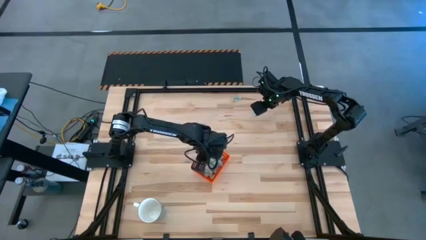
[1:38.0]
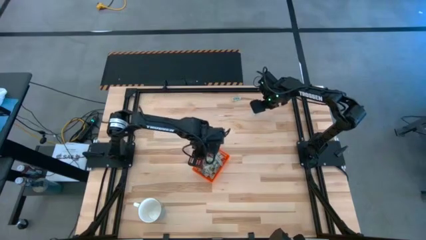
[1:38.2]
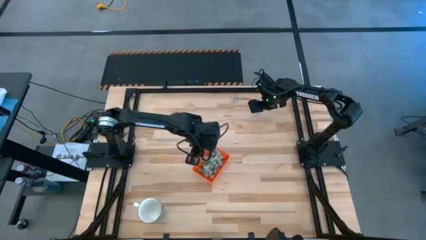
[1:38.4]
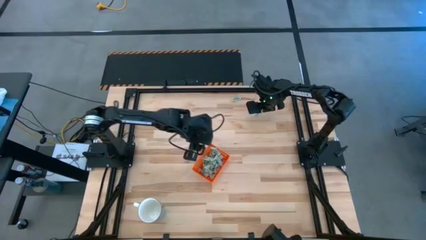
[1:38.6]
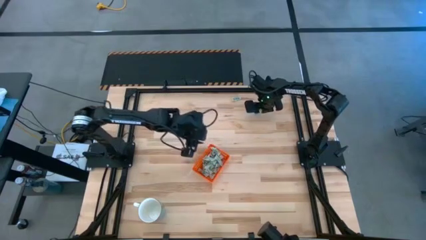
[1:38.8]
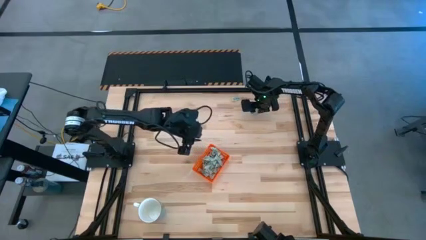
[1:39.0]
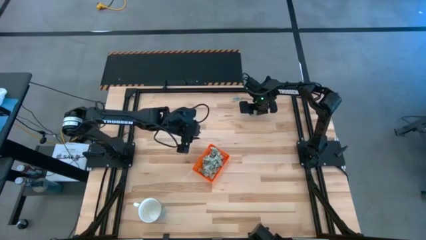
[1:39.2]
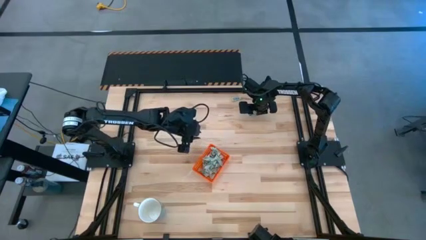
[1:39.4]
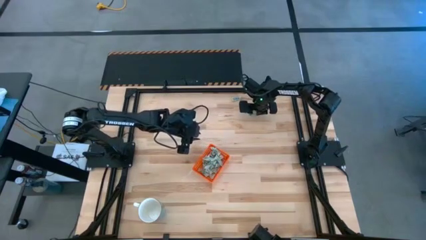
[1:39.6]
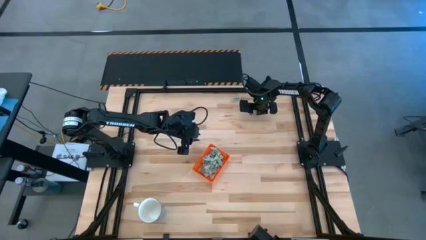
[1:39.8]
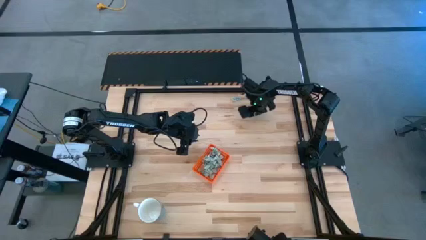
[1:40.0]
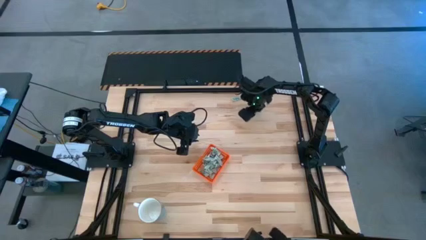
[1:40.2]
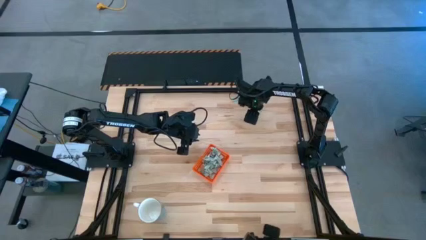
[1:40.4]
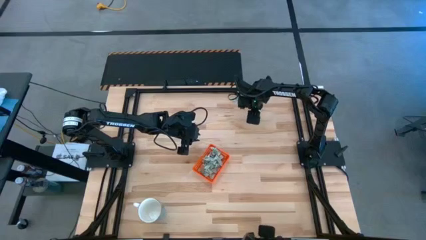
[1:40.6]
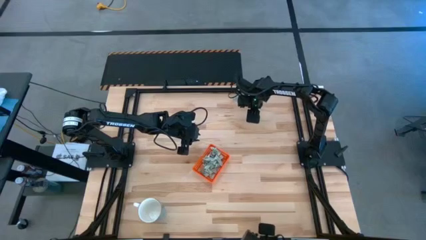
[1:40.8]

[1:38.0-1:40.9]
Task: Pick and place Stevia / Truvia into bins
Put the stevia packet into the orange bin

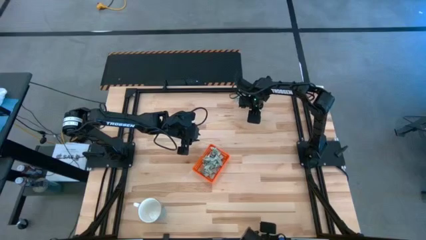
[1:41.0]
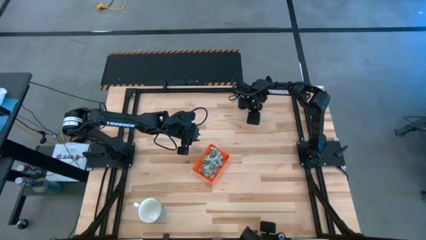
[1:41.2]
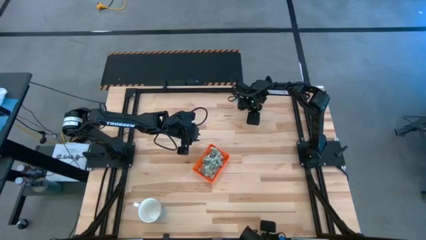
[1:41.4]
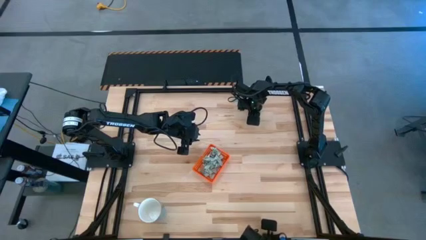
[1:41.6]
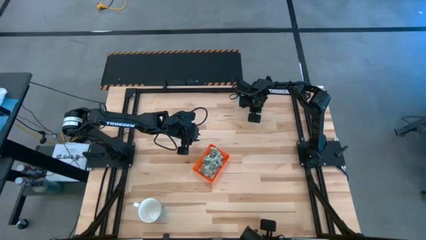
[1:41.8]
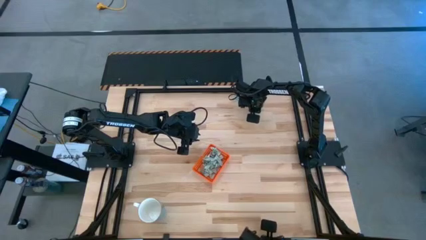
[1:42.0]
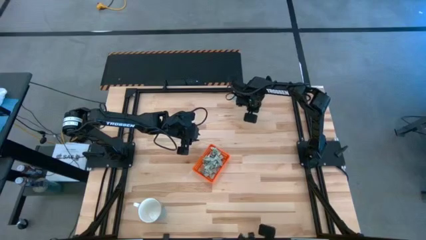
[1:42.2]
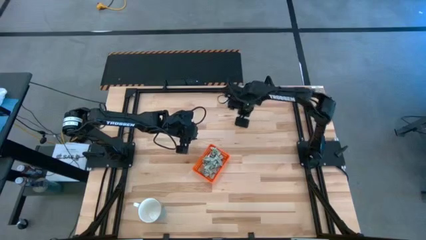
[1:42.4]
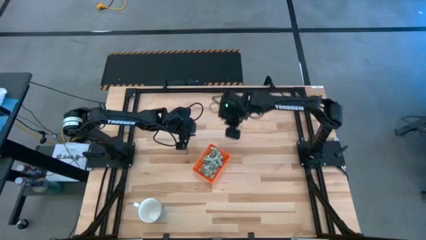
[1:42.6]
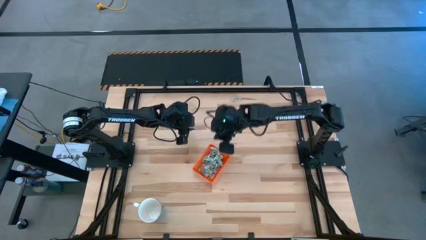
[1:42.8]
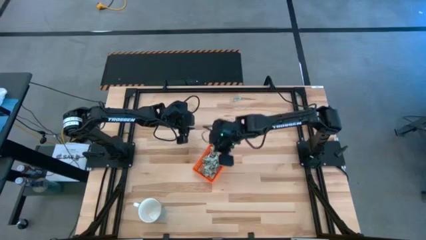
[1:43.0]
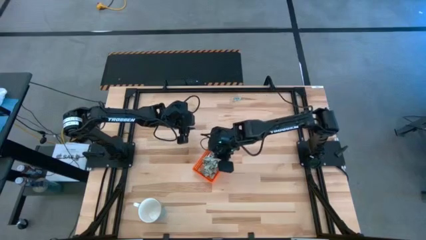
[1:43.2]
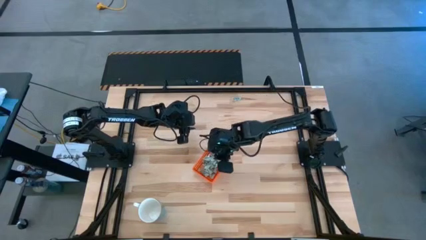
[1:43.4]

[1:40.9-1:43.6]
Put the stevia packet into the orange bin

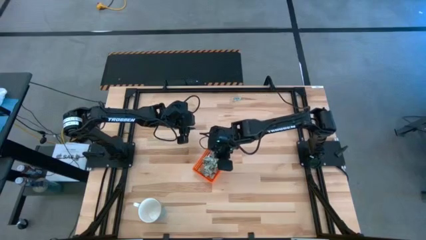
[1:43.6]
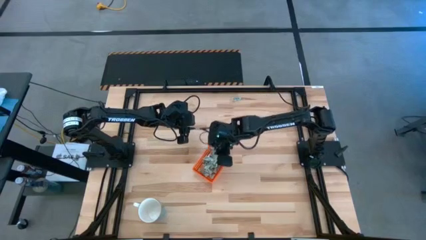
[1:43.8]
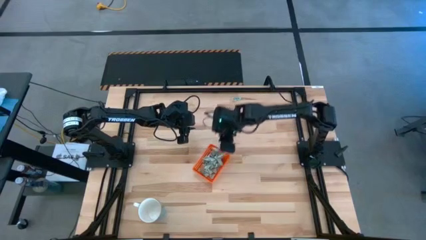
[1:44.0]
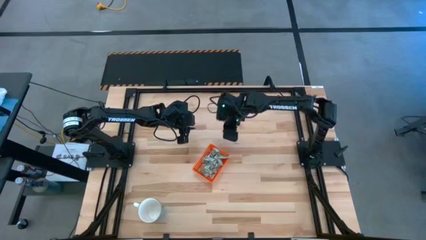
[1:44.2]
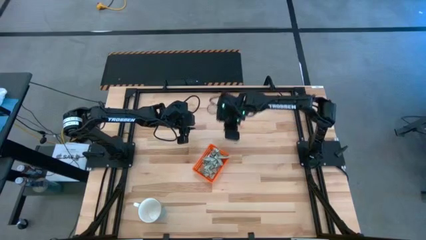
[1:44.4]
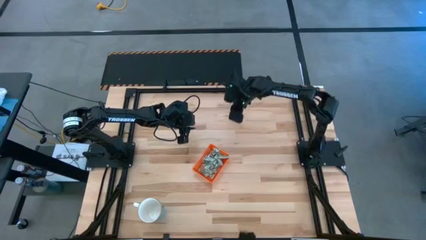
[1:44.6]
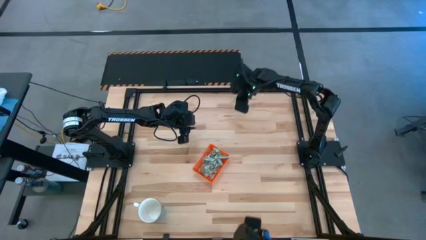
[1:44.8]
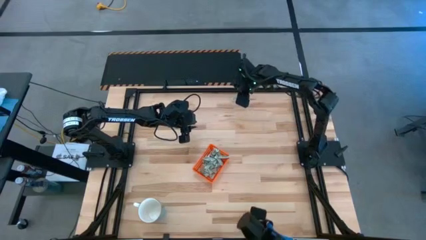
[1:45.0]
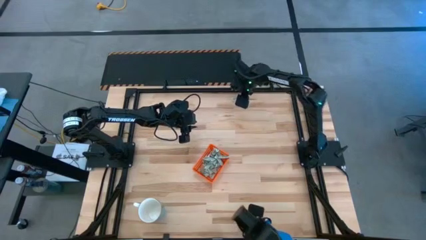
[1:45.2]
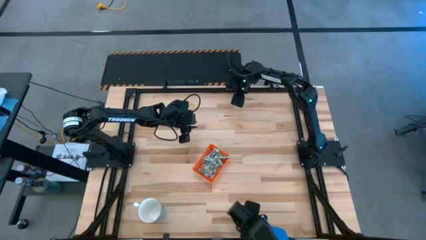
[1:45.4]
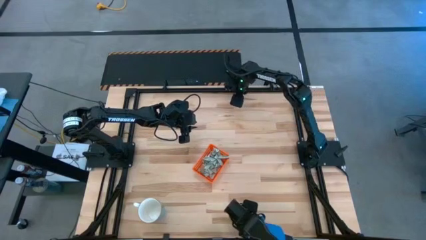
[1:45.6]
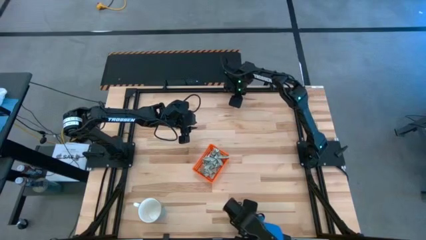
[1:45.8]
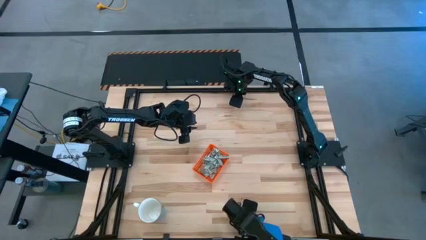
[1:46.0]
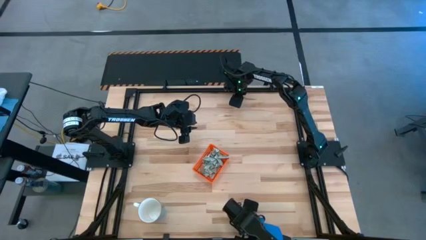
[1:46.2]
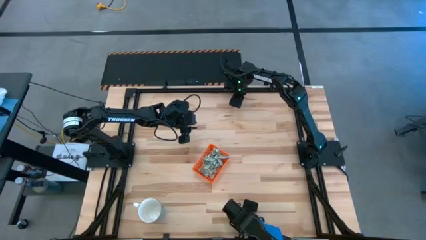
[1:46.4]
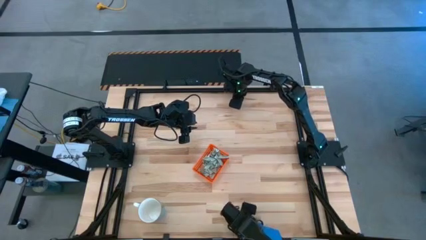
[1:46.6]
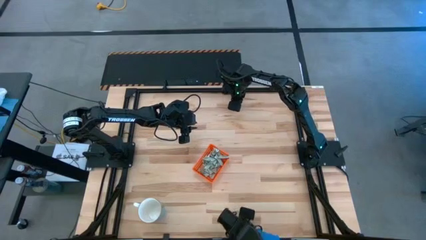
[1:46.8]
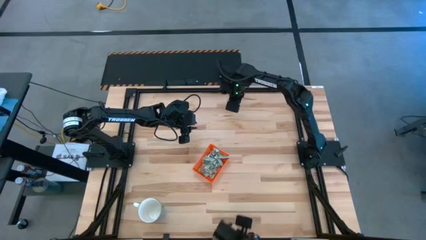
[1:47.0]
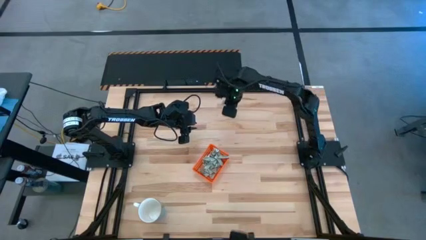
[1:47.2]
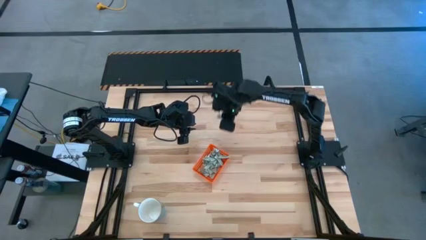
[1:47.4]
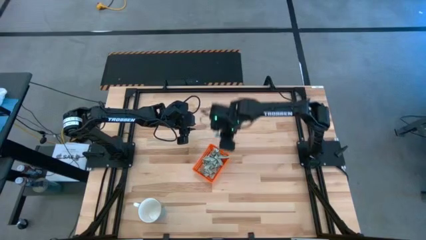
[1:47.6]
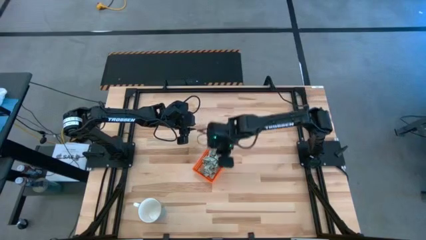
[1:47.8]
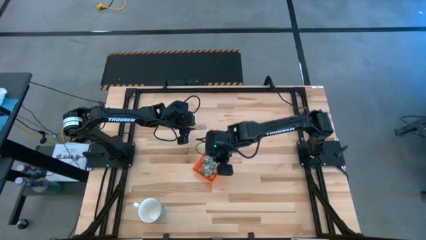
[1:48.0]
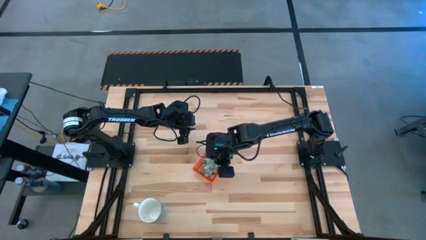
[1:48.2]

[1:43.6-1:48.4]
Put the stevia packet into the orange bin

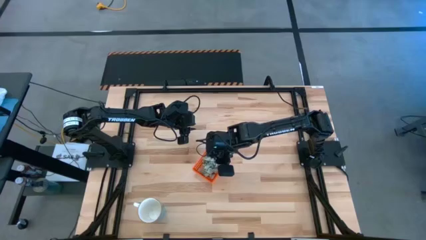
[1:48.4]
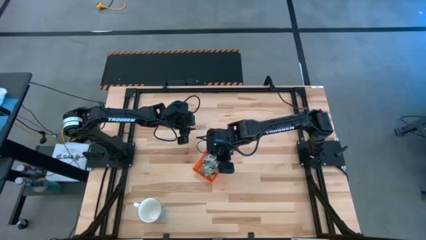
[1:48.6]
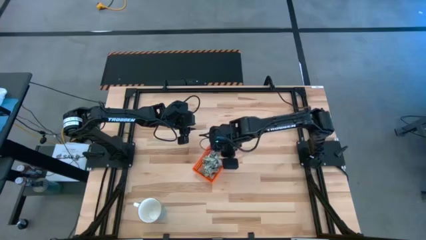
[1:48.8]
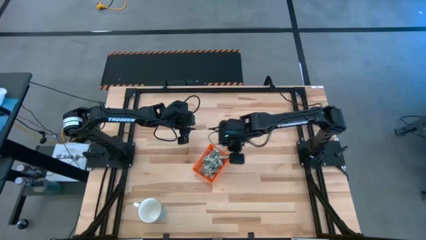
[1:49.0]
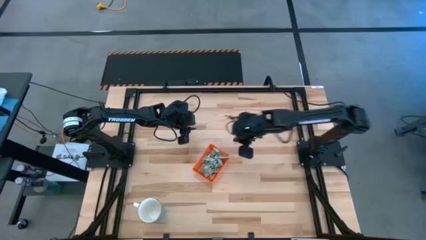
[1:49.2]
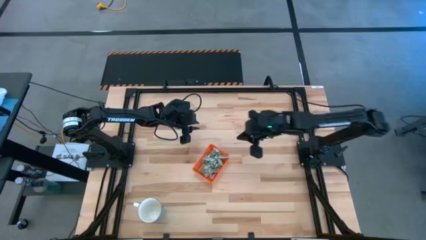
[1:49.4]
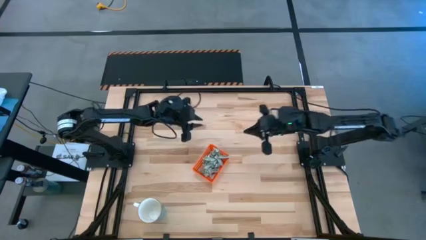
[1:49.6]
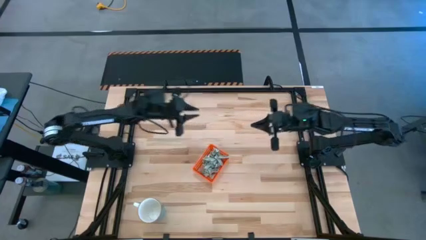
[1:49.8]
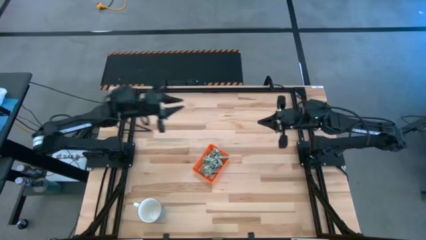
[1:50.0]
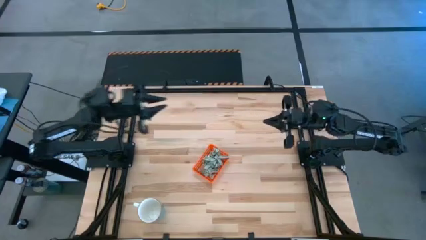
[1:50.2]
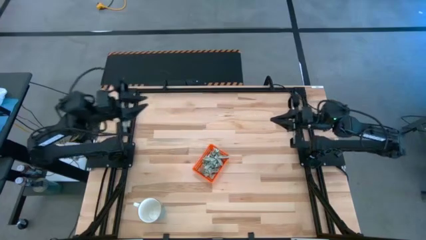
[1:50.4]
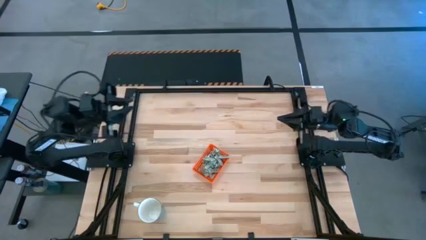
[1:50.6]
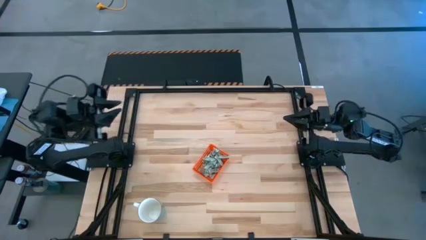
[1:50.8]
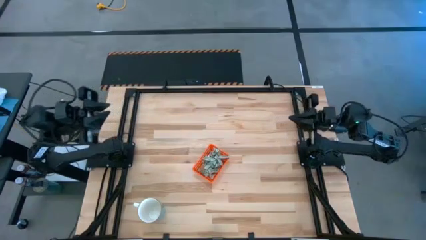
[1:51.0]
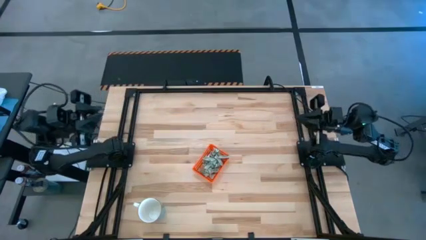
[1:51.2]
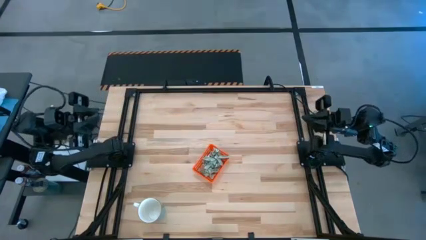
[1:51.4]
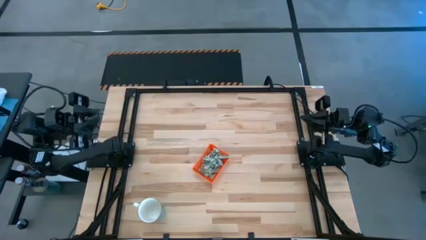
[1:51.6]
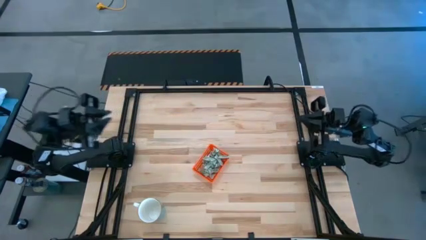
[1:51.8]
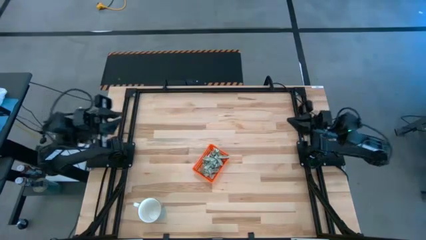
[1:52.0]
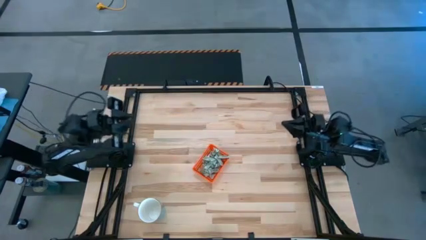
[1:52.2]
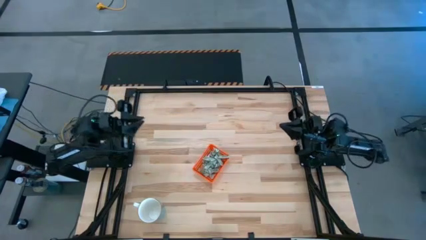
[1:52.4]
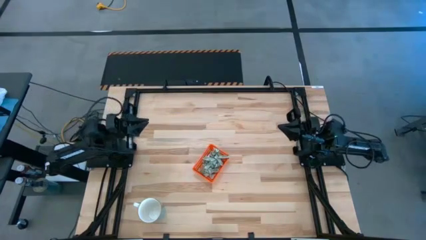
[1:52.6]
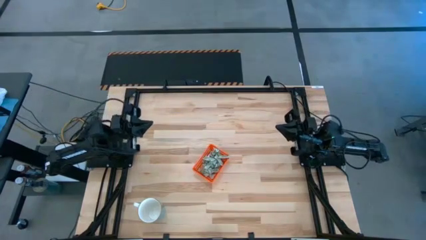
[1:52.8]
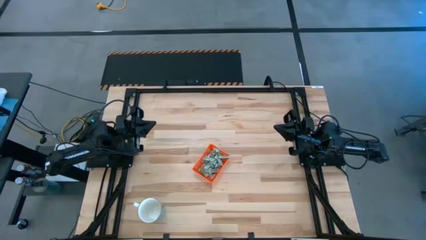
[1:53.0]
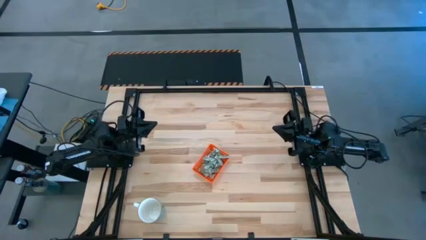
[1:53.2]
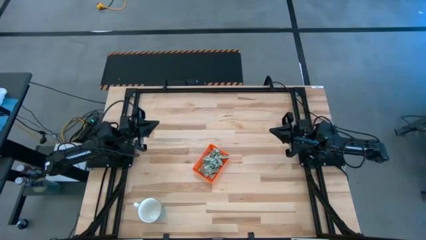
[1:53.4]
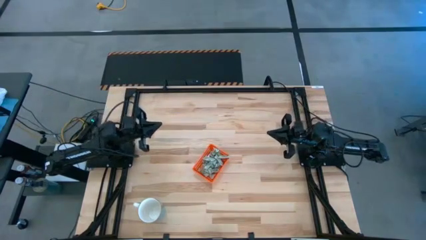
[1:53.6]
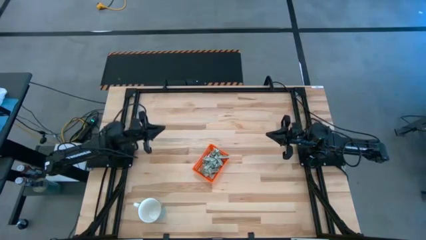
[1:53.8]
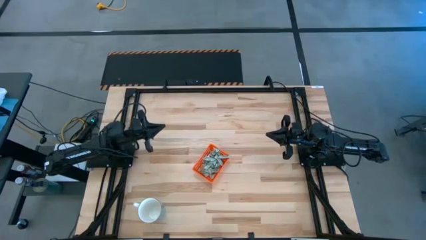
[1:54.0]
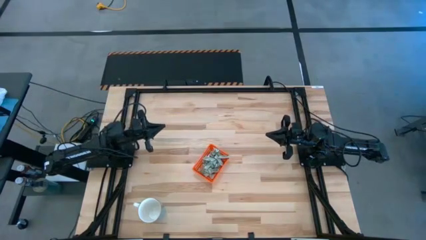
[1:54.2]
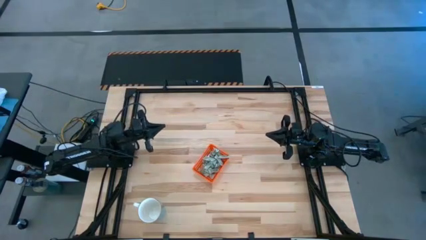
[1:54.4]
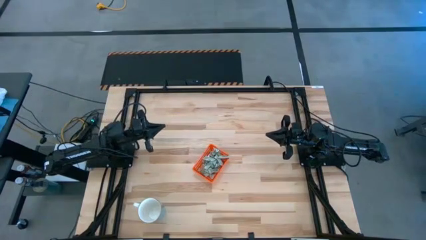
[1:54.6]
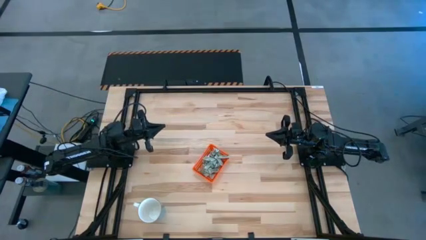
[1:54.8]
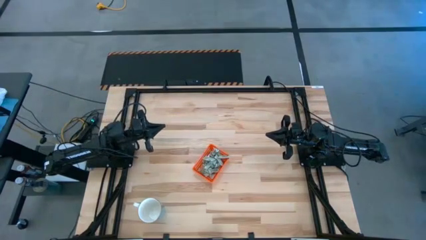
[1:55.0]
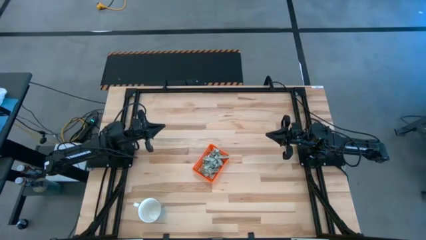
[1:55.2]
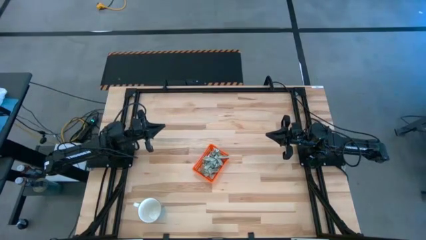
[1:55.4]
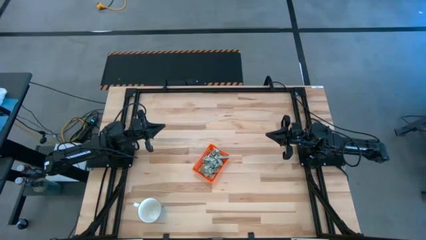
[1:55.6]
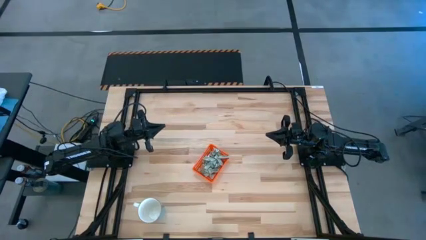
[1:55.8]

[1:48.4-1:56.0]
Return to Home Position
